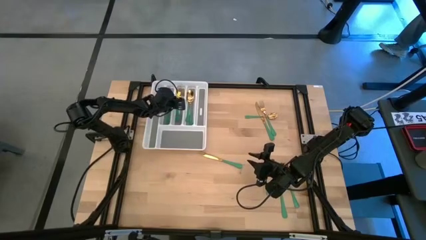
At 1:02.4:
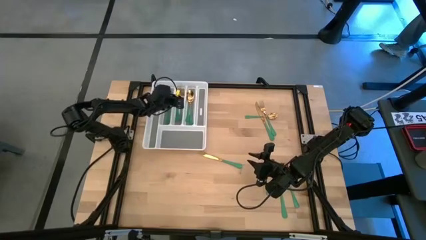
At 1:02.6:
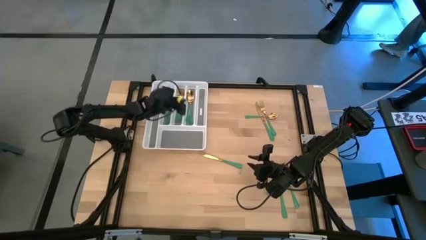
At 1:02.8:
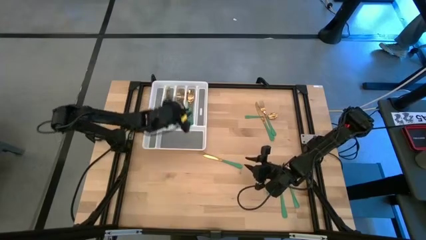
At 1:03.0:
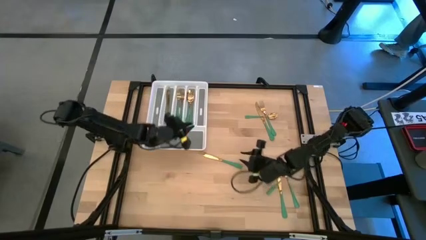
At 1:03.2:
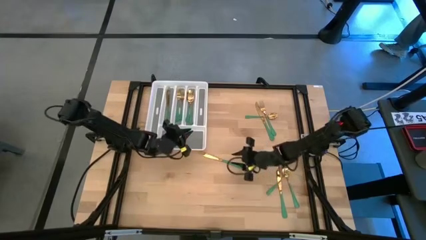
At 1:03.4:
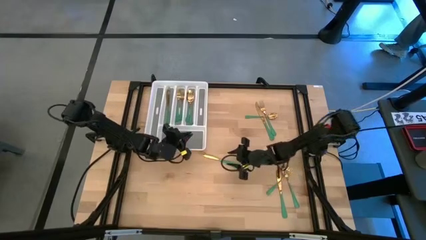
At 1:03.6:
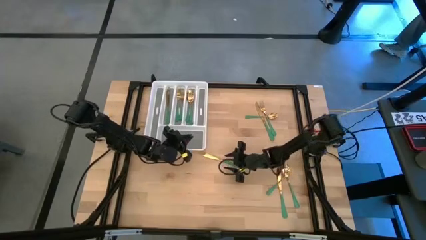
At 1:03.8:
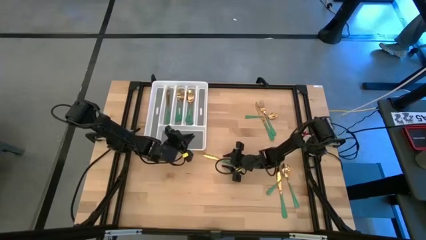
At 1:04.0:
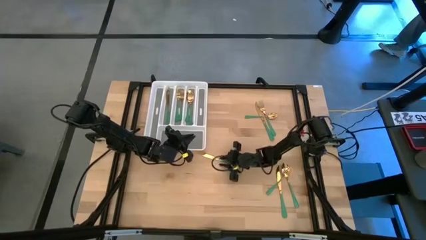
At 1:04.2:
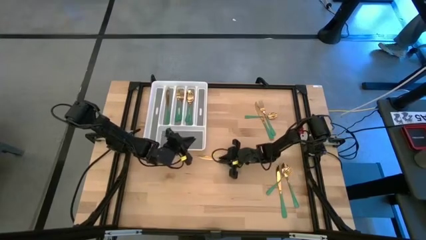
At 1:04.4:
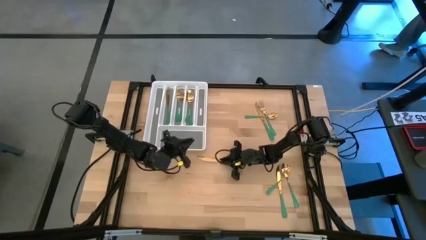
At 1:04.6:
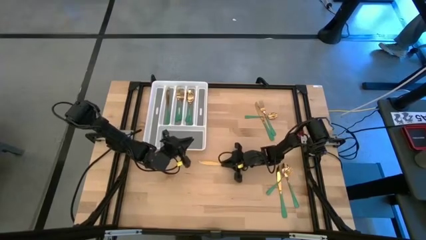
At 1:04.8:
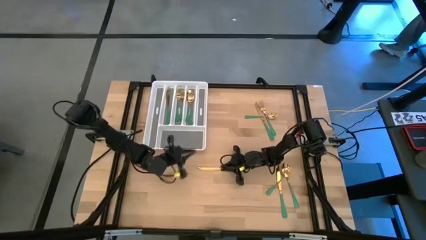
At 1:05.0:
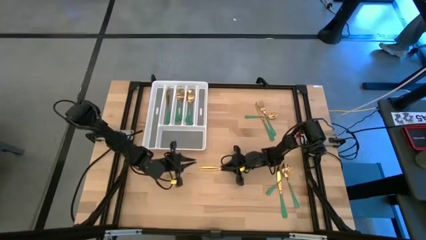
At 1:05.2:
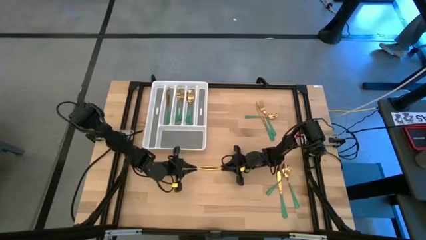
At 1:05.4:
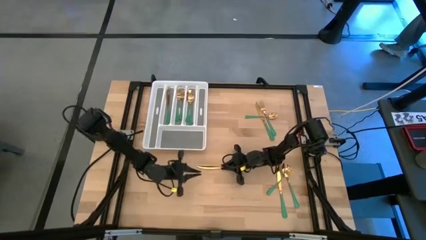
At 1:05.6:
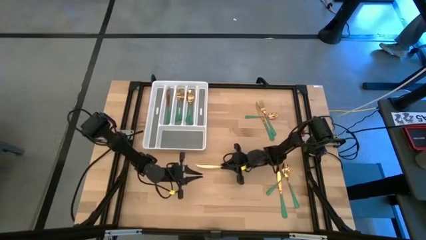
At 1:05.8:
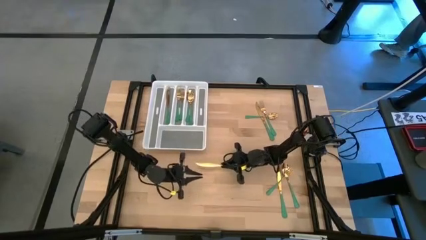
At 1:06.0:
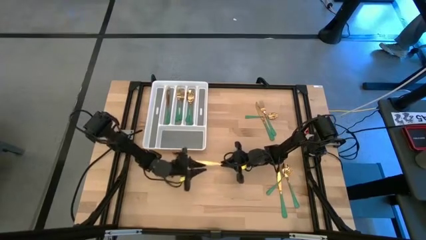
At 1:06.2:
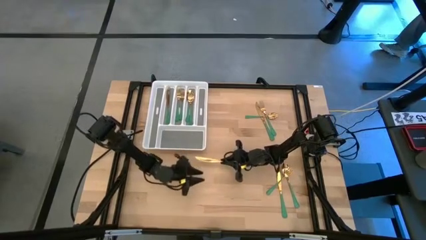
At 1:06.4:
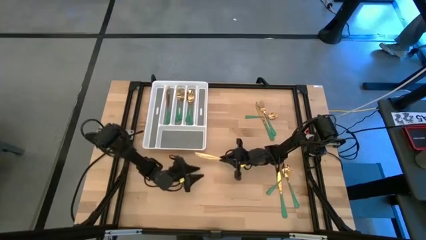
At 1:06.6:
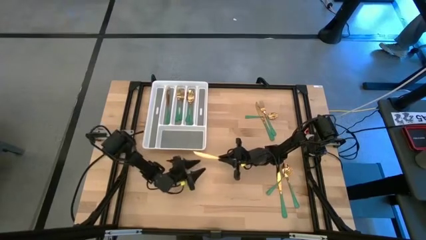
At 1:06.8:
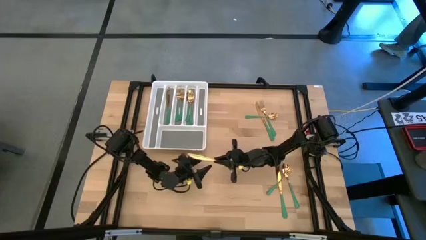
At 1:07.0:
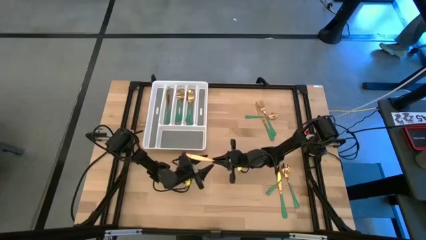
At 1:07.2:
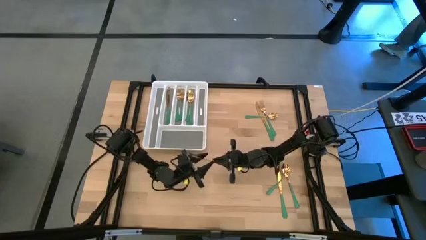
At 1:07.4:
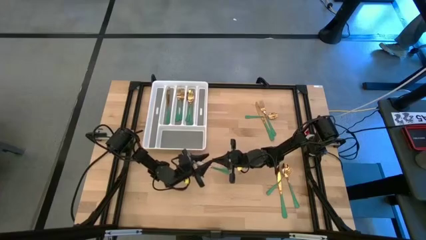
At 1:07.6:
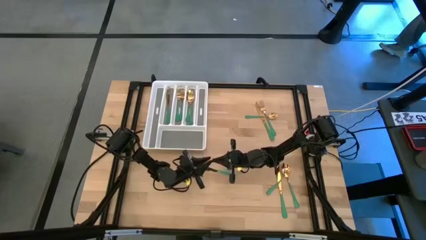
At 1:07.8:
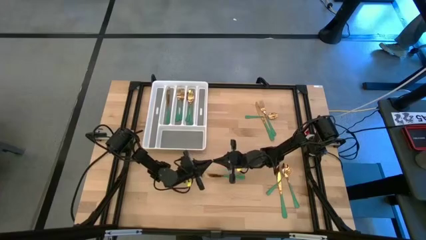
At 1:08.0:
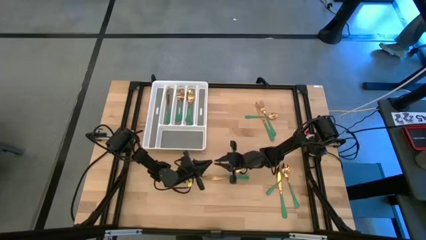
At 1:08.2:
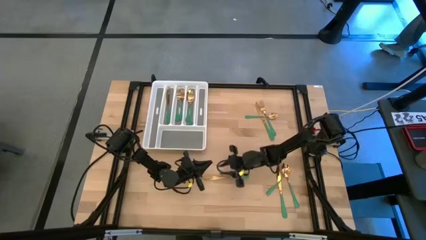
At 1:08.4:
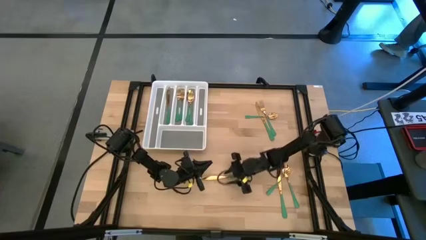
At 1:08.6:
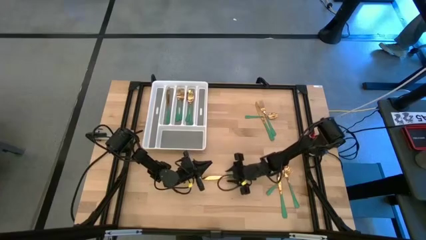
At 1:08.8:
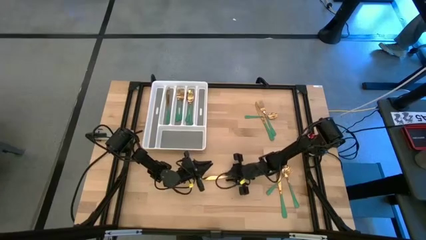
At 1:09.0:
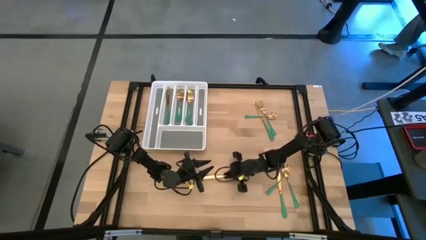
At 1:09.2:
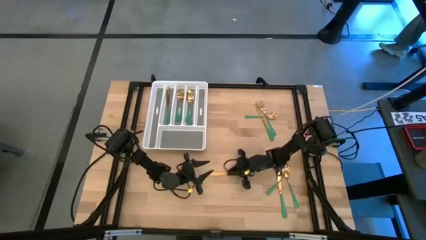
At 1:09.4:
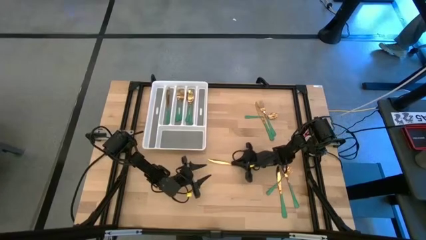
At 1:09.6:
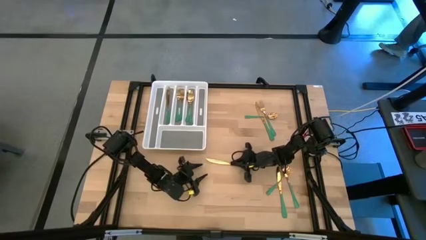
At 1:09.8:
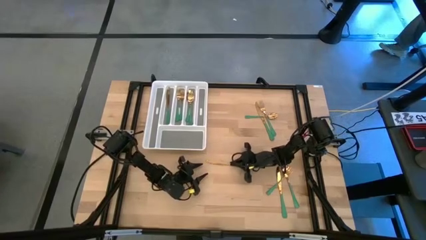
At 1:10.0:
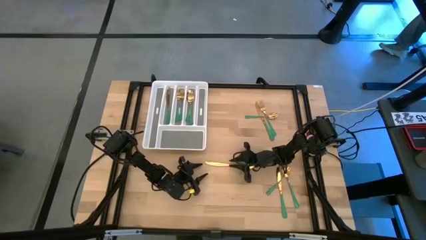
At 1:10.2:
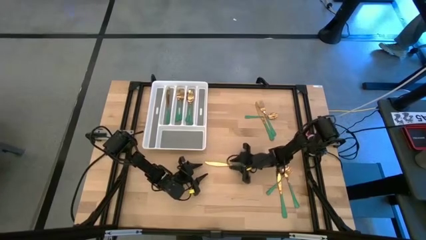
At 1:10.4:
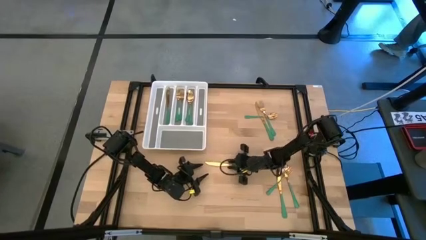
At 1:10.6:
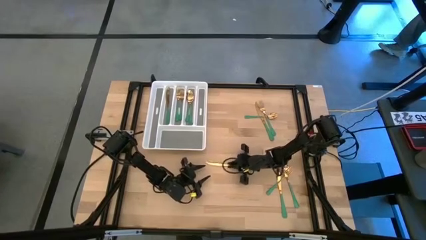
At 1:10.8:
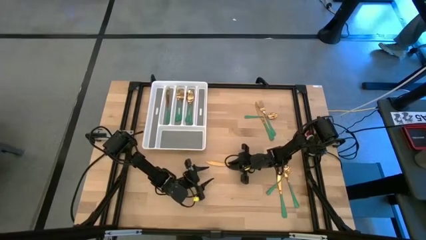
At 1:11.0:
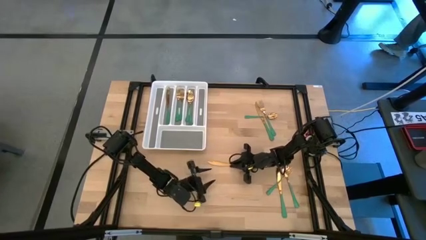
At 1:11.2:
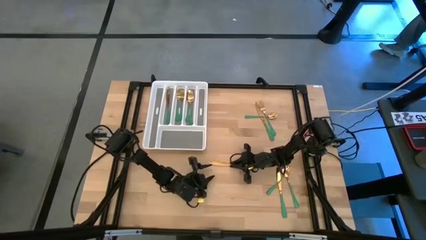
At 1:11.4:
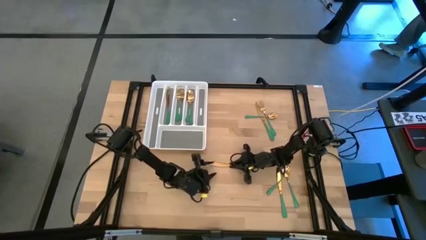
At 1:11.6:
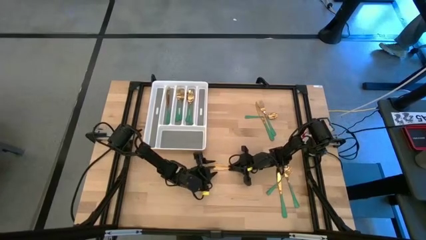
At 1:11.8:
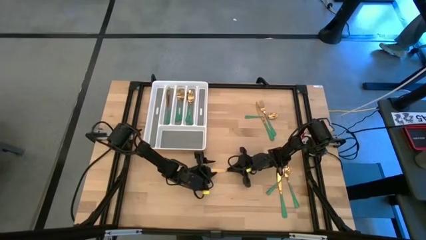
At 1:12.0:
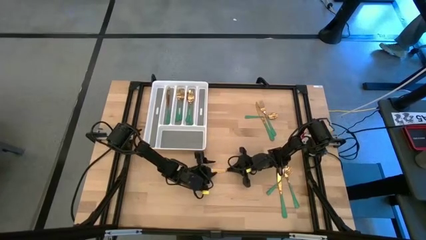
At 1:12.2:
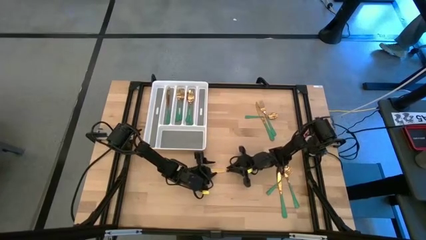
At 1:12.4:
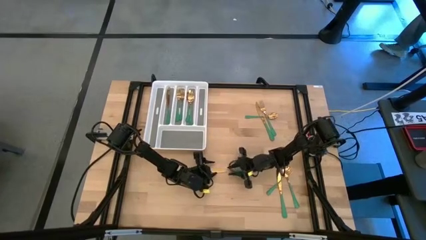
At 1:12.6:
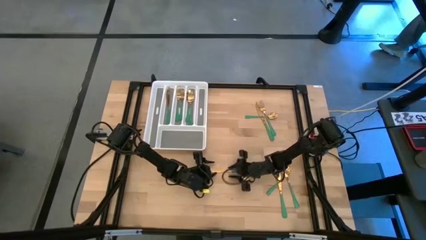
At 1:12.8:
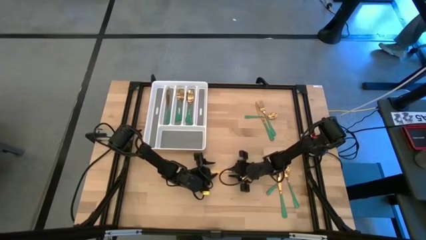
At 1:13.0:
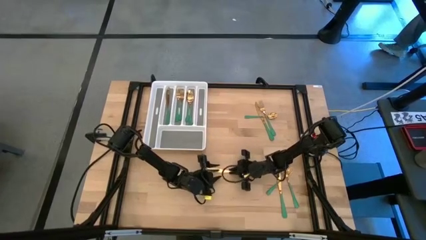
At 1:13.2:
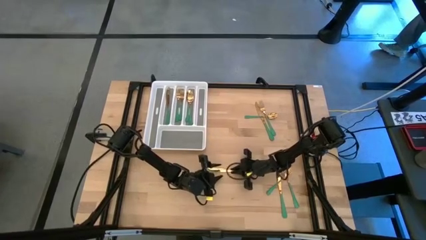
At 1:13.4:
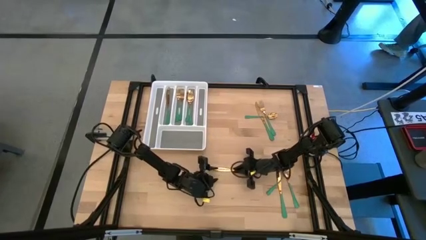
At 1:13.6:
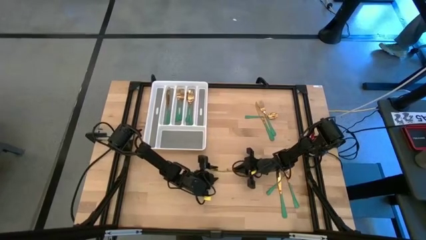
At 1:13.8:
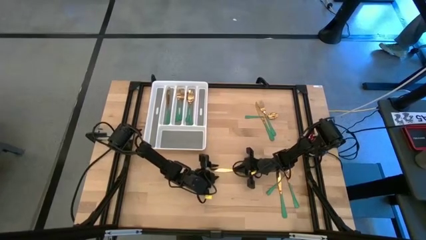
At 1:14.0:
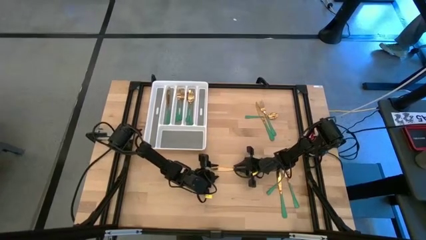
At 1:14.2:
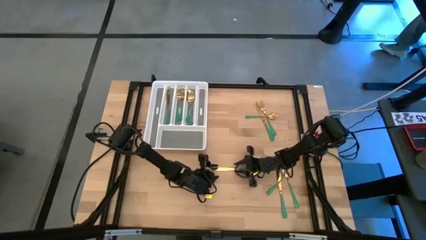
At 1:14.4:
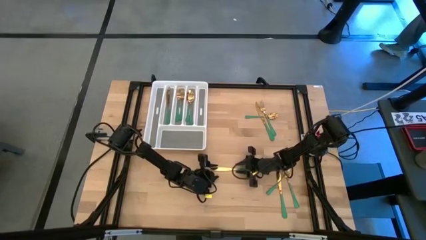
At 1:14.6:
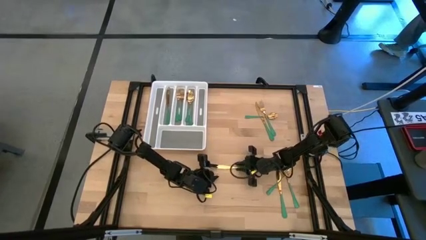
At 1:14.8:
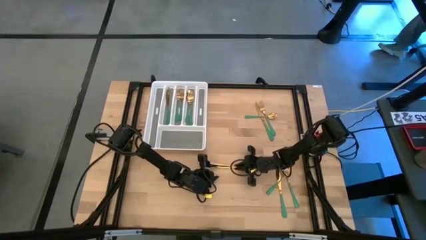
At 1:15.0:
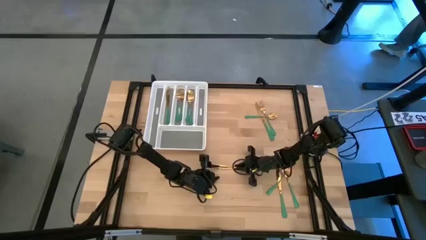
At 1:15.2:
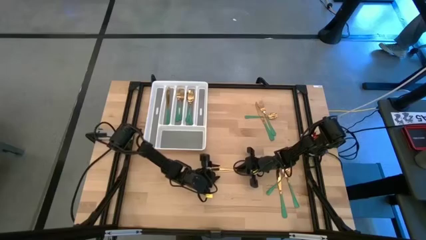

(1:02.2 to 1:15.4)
Task: Sort silverware
Put the green knife into the white cutlery tray
